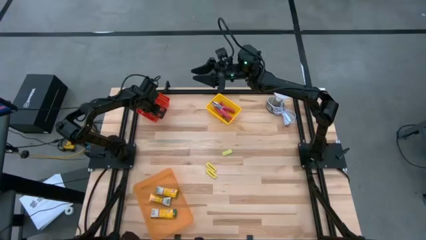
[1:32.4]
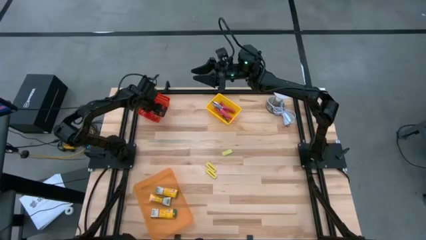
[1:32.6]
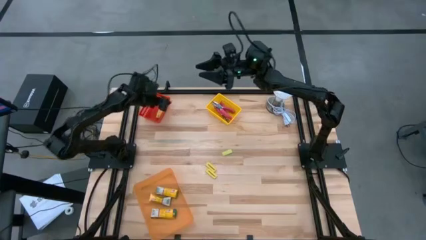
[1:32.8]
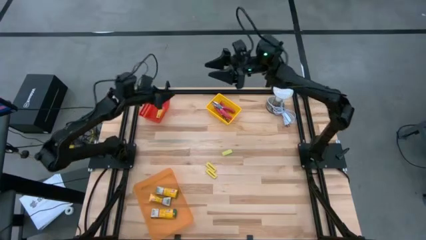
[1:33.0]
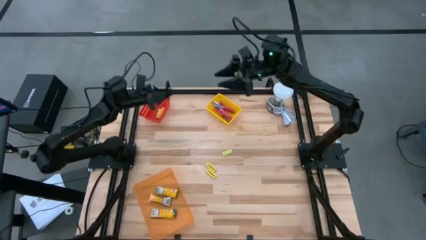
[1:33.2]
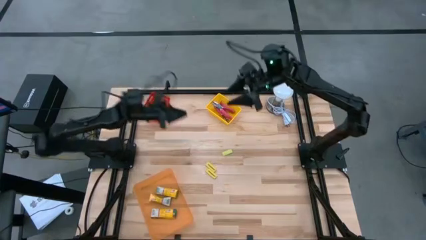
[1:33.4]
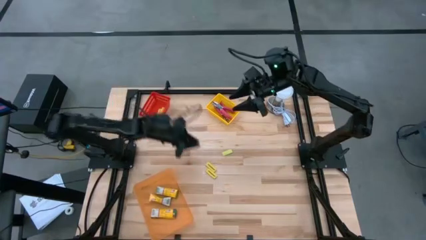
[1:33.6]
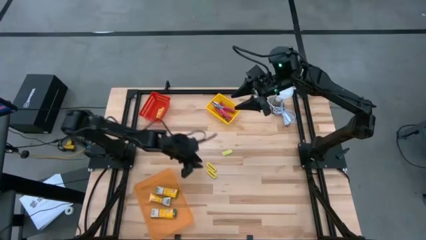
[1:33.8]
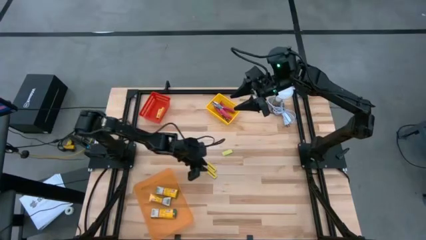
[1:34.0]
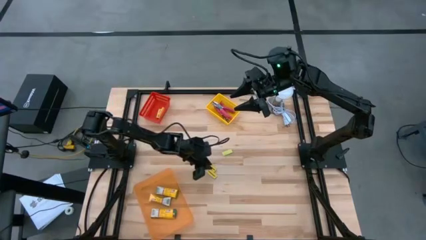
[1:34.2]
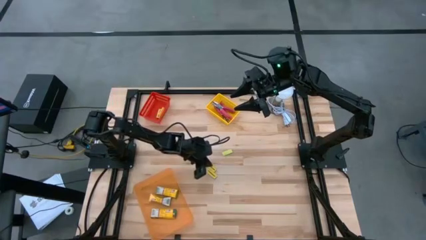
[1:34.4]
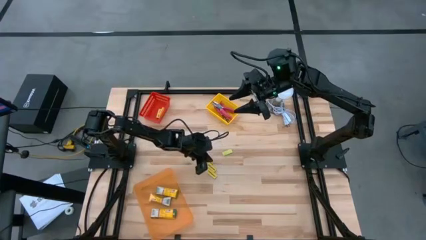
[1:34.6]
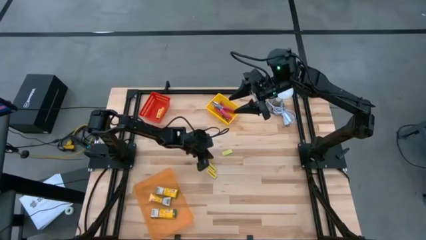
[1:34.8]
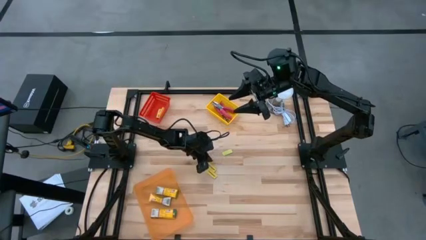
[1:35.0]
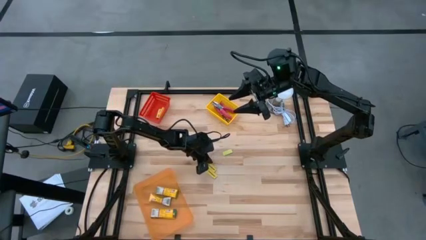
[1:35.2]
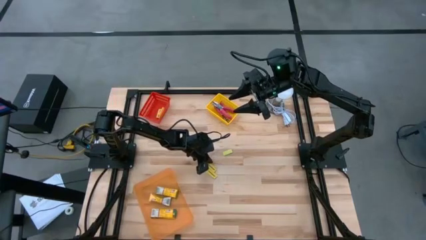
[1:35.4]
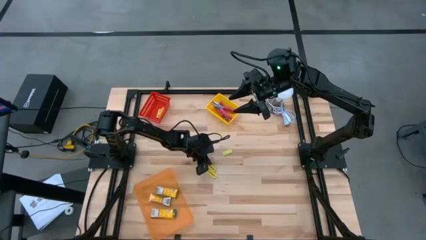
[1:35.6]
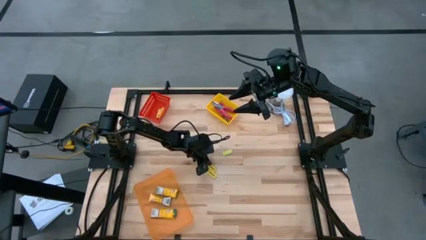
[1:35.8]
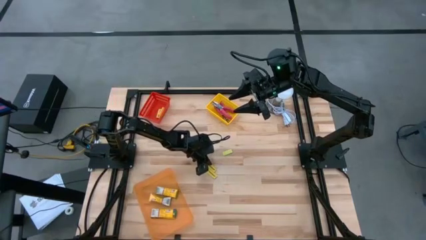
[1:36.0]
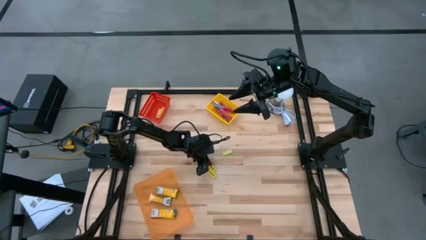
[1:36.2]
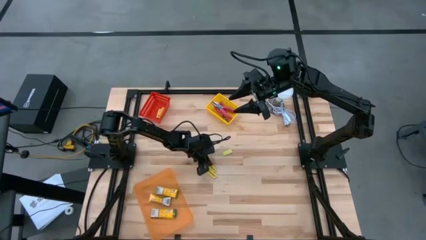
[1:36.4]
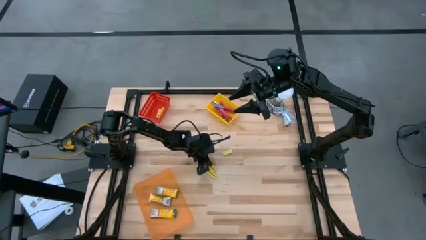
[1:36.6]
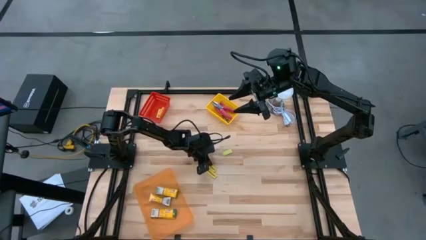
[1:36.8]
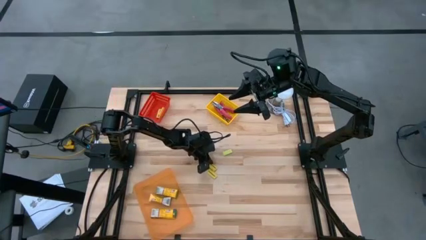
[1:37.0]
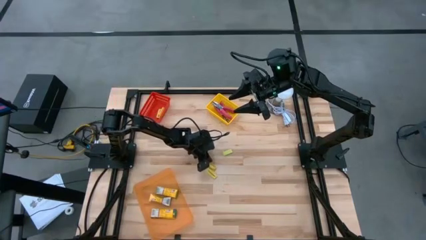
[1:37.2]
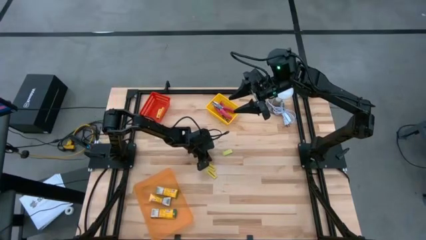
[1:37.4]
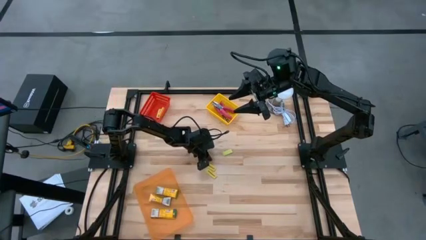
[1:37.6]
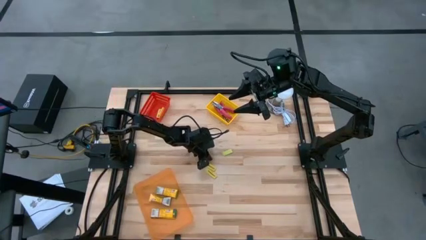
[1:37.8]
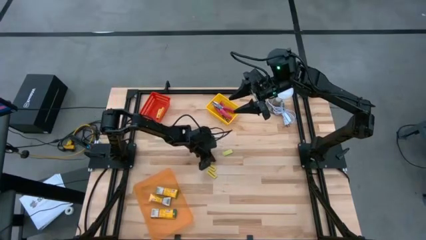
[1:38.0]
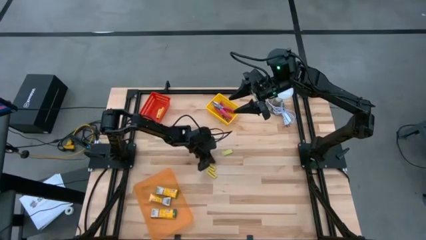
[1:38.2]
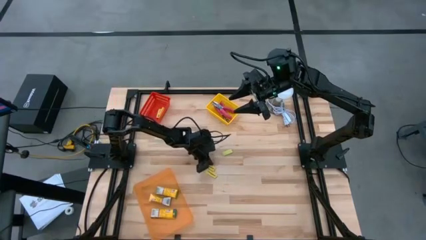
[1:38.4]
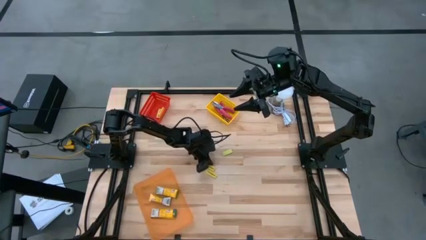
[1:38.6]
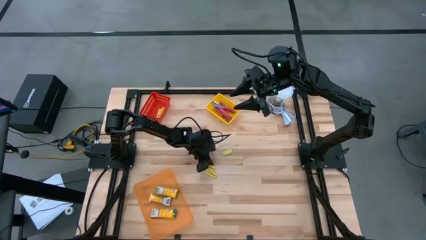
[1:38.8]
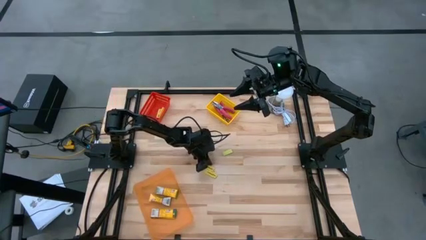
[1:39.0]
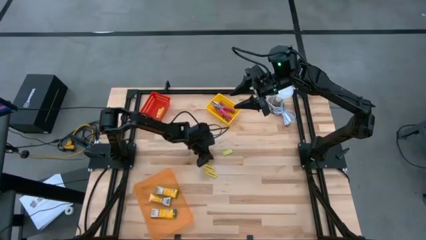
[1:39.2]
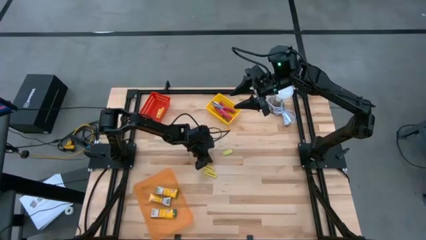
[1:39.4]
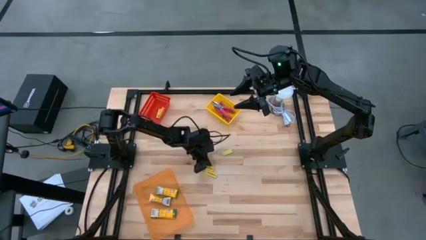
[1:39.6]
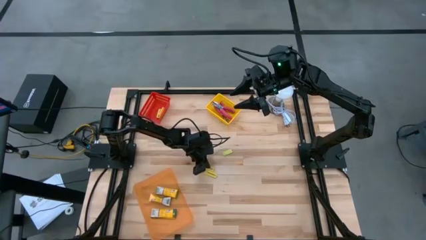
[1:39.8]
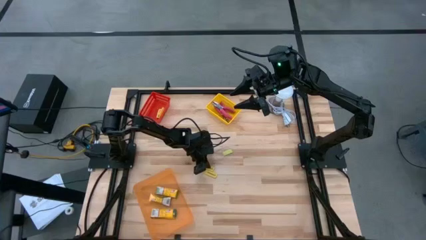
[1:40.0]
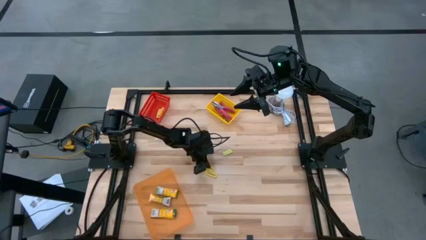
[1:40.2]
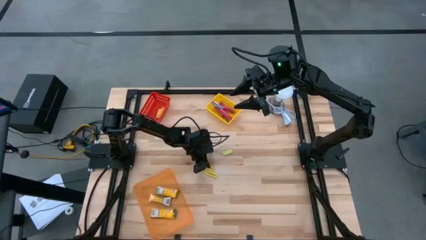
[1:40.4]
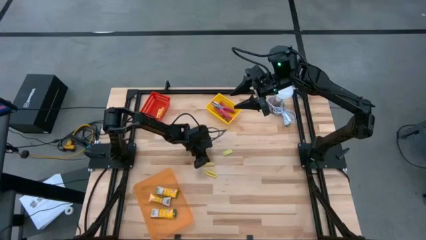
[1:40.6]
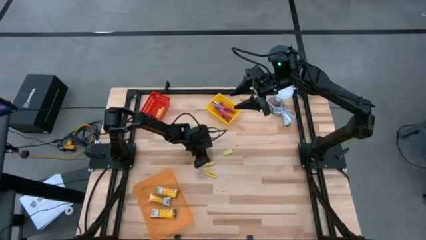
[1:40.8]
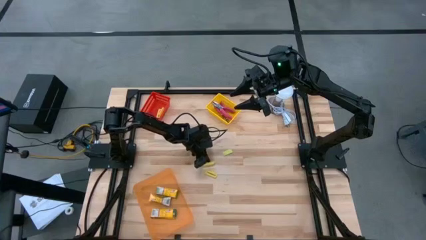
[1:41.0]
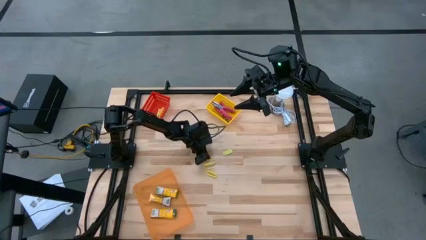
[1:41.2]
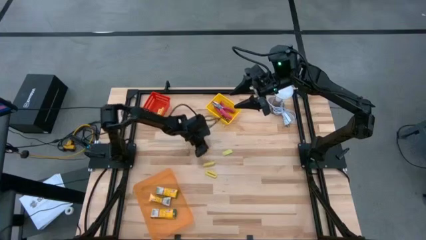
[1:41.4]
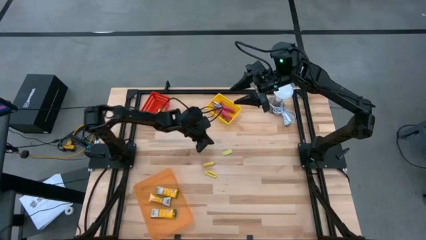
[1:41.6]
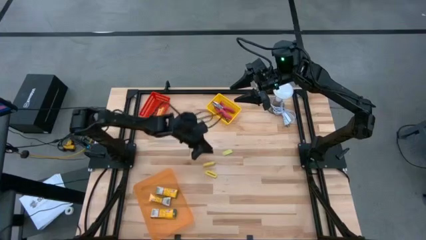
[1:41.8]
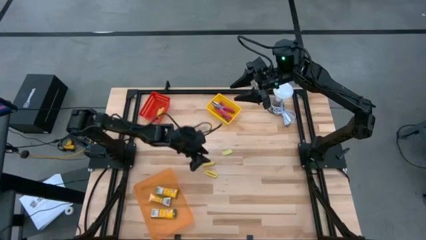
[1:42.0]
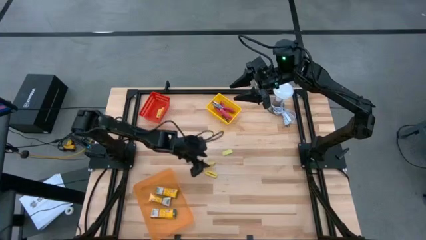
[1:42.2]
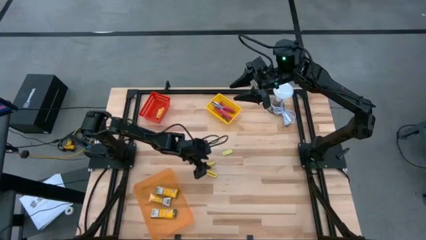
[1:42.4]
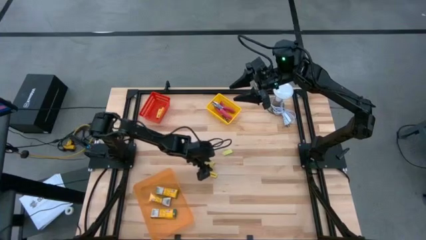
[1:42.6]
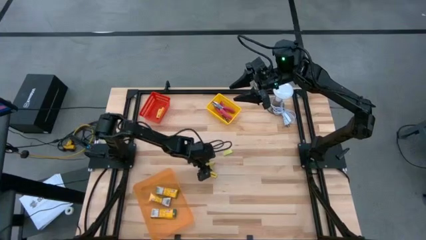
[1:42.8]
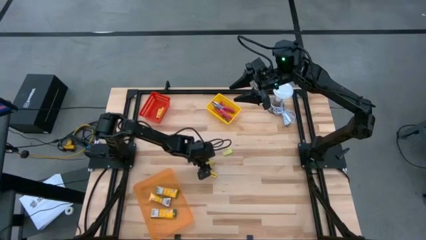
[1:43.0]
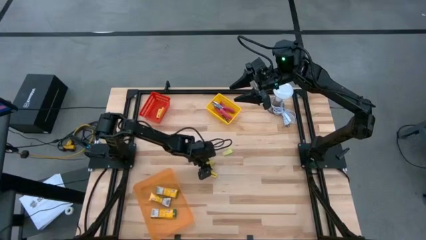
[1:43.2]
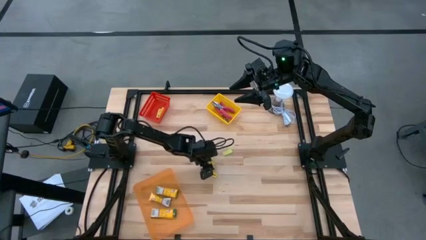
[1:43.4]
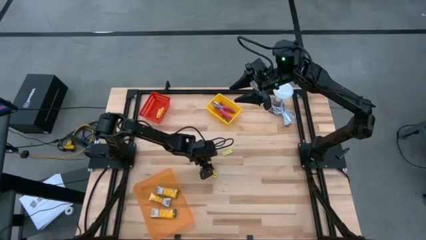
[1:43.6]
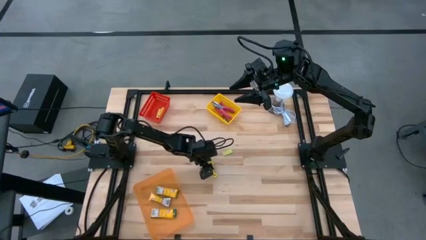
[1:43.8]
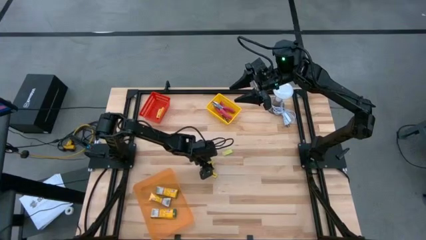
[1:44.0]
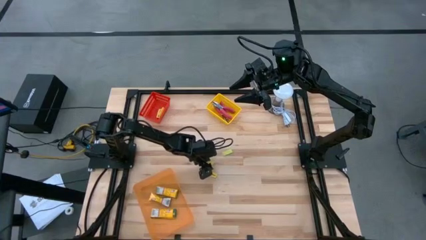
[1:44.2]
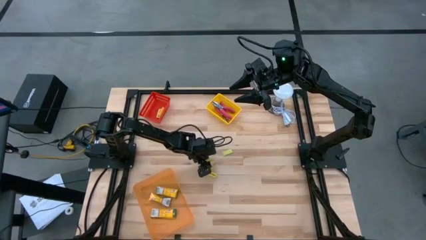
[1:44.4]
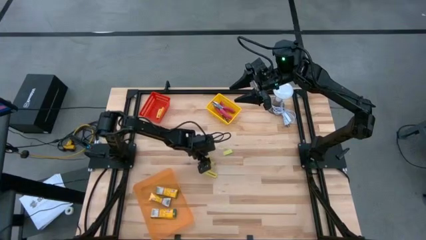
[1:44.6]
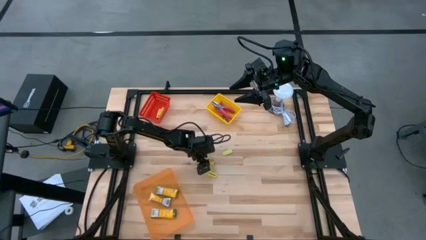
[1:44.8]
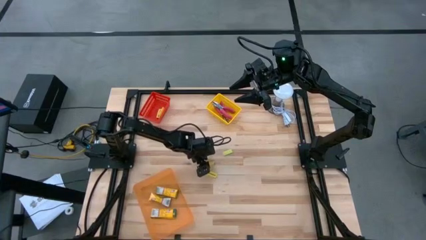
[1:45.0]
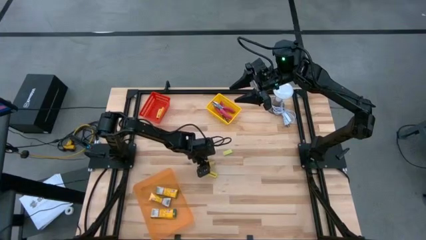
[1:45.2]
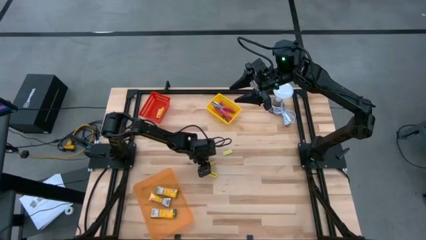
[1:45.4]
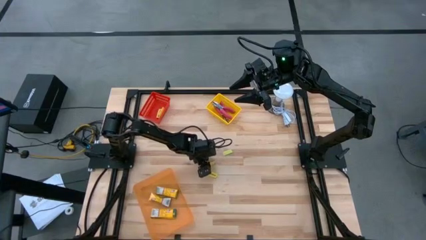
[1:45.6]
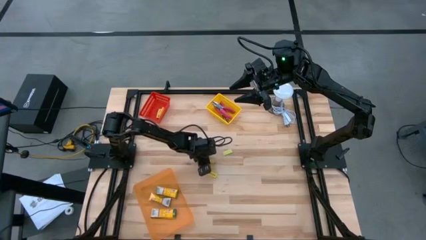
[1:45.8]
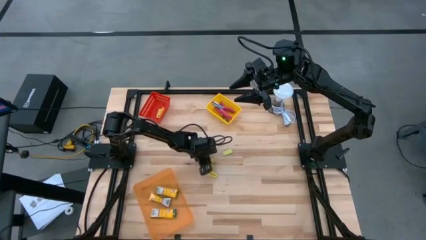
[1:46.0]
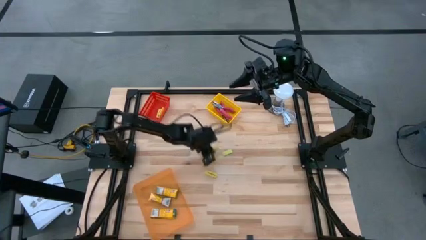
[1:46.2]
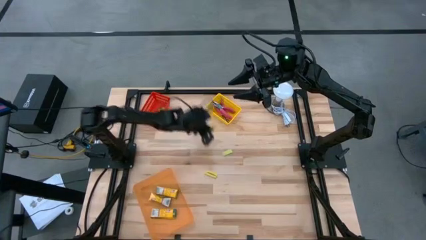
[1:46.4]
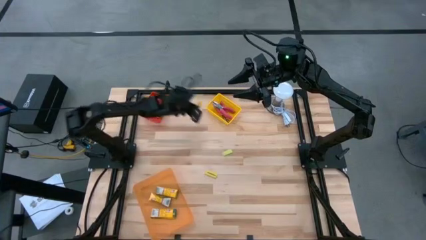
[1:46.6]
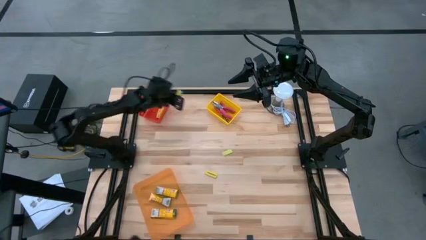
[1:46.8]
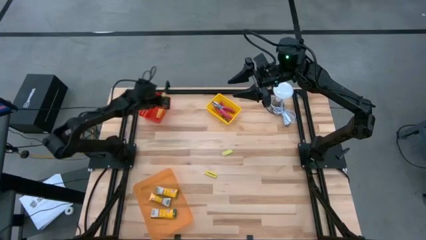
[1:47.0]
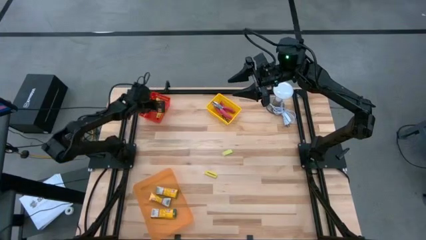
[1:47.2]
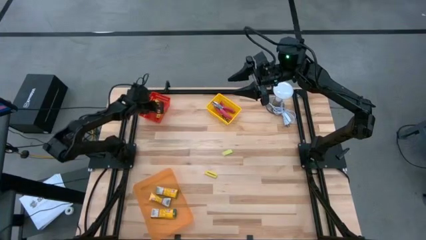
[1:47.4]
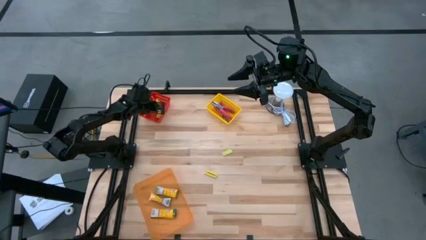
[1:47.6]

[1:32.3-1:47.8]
Task: Pick & Place School Supplies
Put the yellow eraser into the red bin

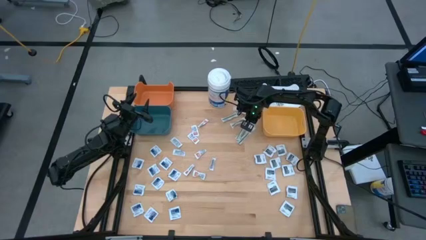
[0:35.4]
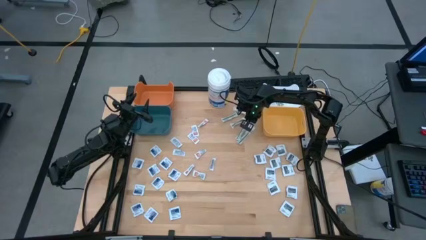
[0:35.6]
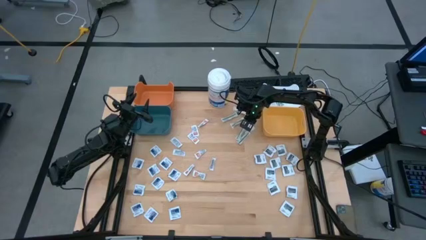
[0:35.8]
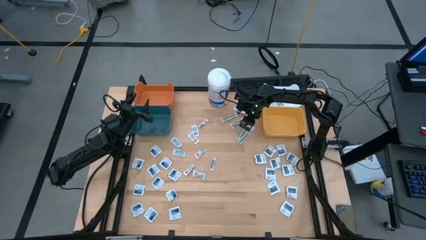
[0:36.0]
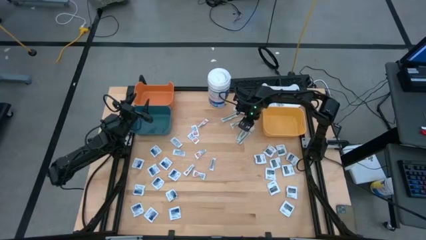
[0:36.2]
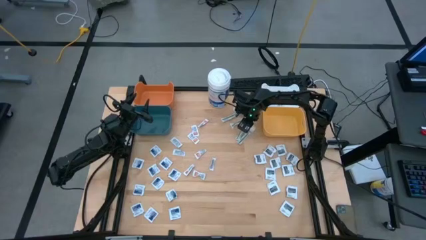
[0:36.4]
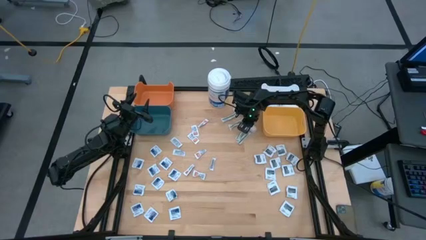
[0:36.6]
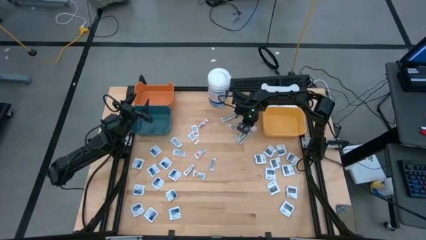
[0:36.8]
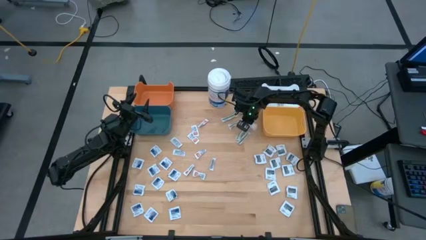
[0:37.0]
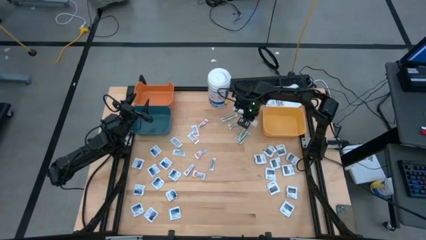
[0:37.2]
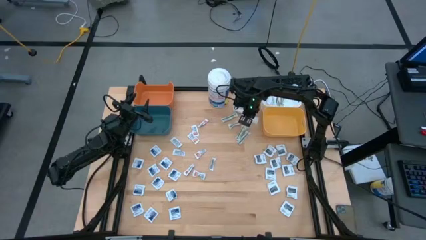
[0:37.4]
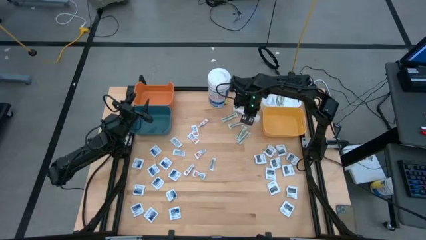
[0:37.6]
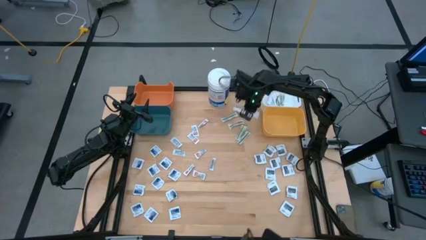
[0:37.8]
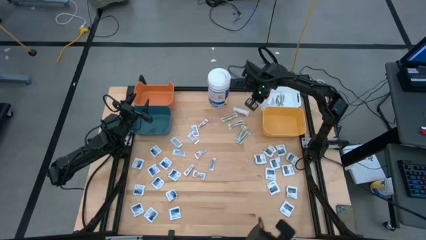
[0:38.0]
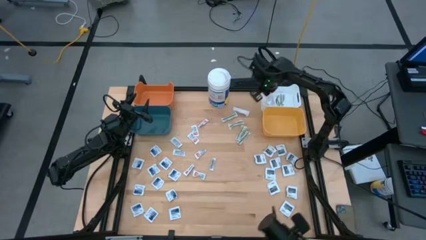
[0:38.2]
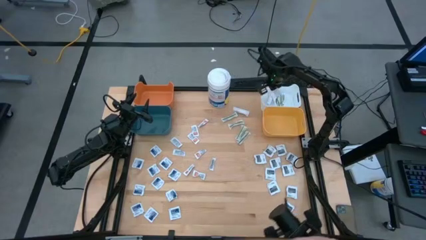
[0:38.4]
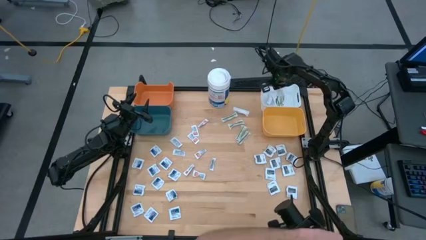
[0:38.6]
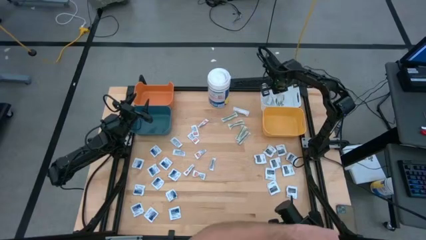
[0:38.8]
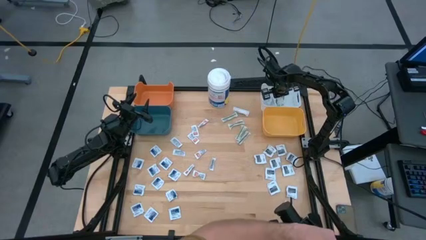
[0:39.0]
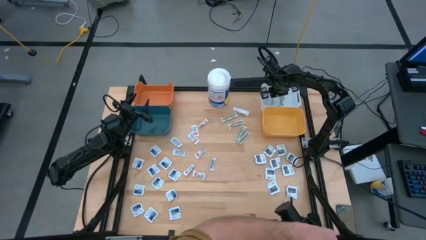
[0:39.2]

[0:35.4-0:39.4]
Task: Pick & Place First Aid Supplies
Put the green bandage into the white bin
